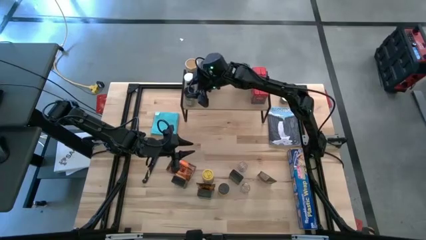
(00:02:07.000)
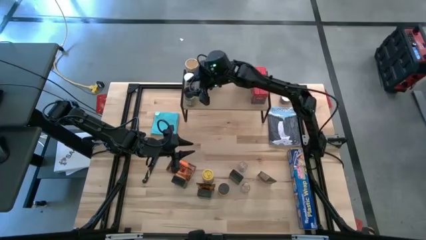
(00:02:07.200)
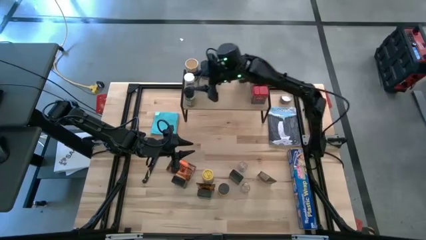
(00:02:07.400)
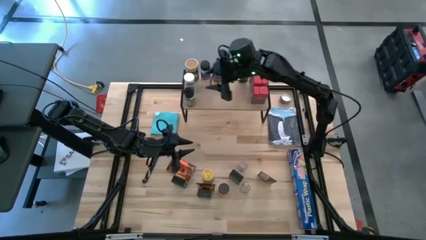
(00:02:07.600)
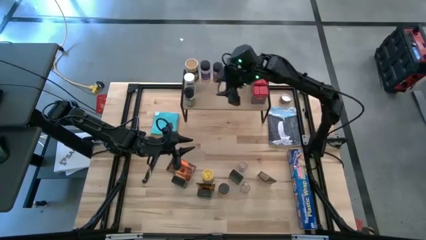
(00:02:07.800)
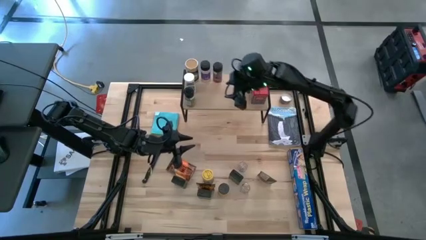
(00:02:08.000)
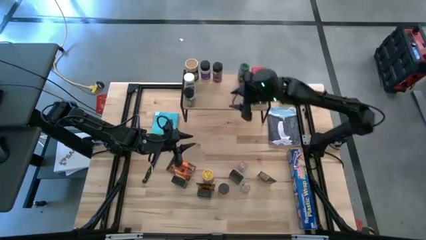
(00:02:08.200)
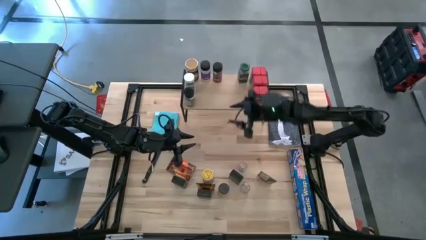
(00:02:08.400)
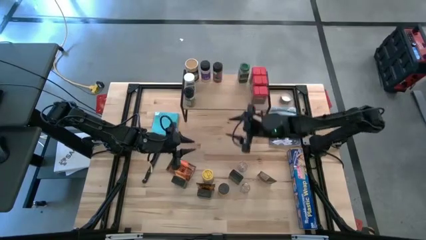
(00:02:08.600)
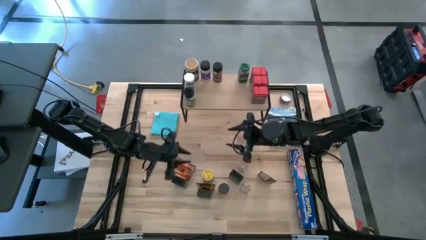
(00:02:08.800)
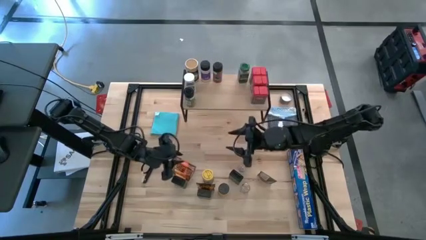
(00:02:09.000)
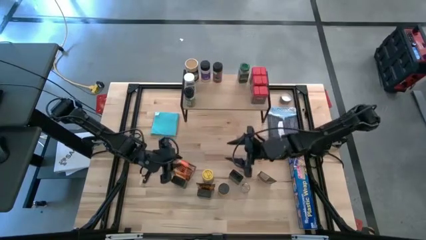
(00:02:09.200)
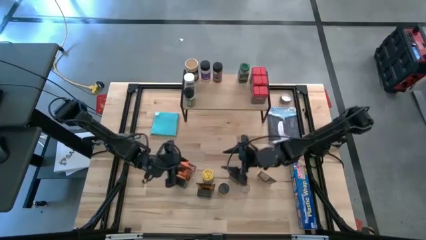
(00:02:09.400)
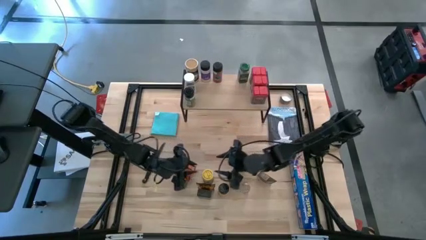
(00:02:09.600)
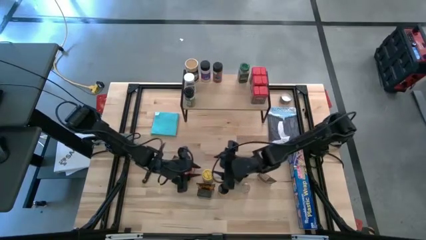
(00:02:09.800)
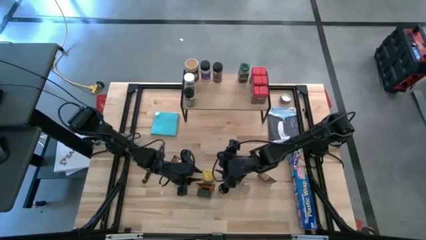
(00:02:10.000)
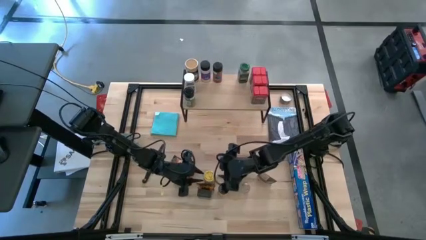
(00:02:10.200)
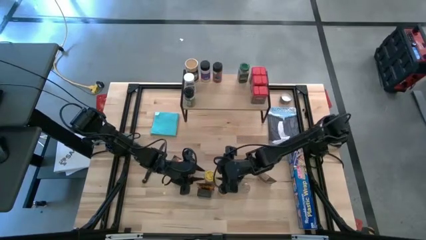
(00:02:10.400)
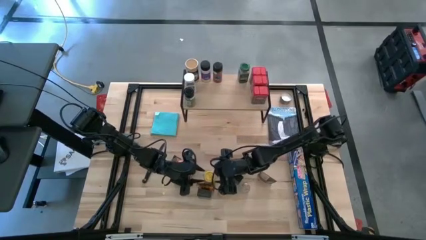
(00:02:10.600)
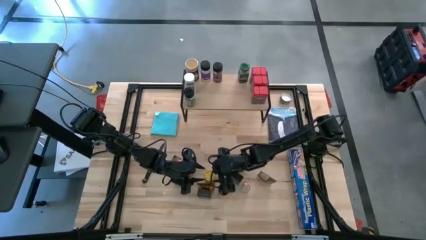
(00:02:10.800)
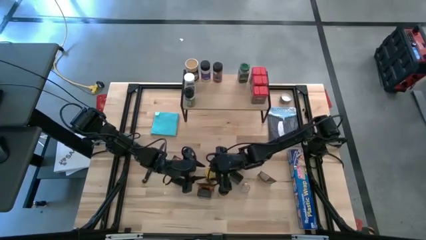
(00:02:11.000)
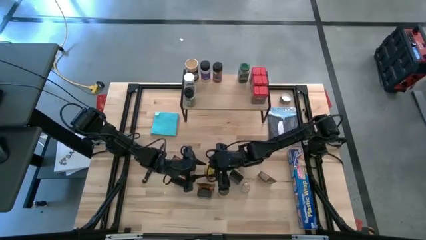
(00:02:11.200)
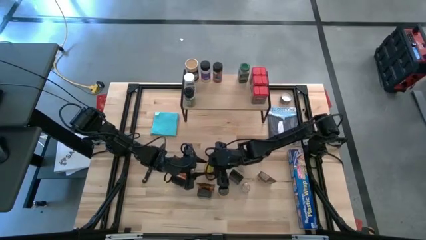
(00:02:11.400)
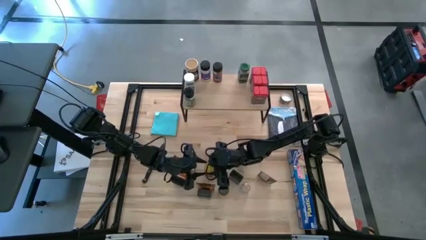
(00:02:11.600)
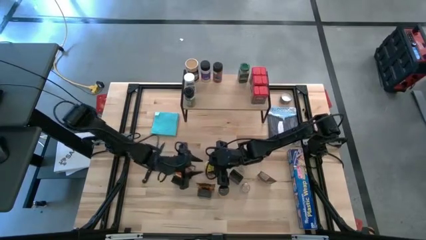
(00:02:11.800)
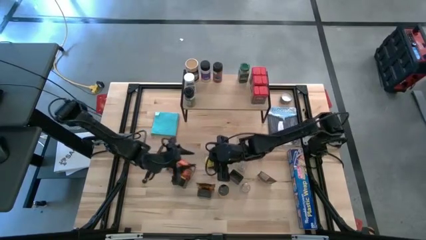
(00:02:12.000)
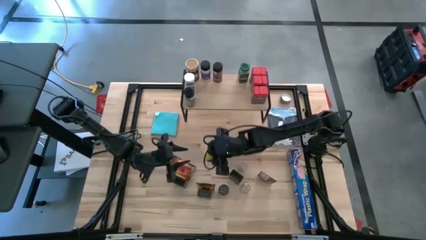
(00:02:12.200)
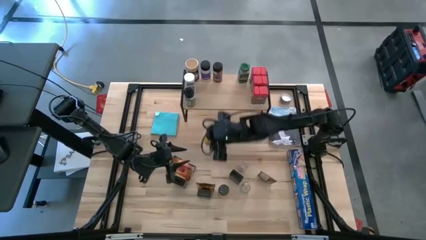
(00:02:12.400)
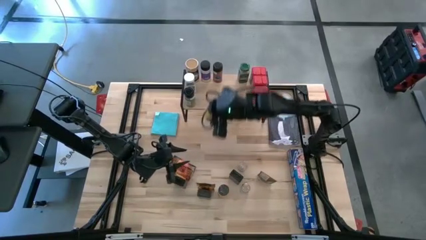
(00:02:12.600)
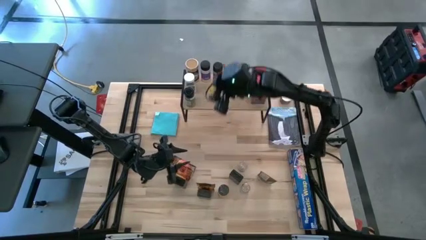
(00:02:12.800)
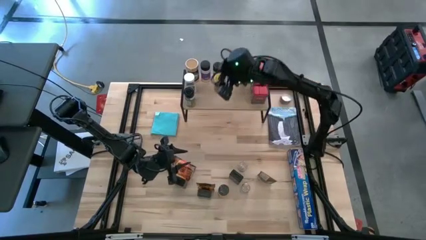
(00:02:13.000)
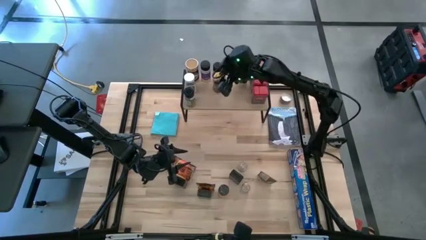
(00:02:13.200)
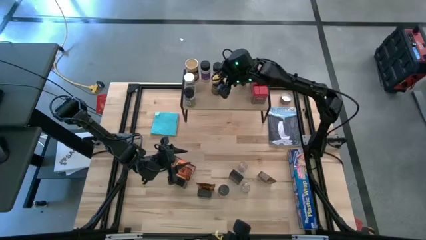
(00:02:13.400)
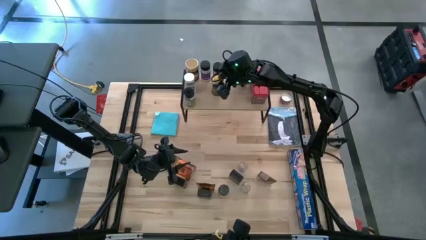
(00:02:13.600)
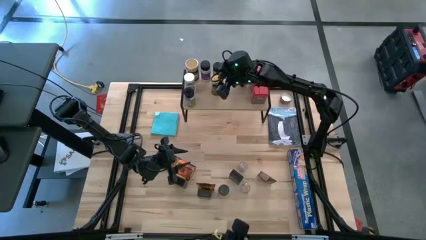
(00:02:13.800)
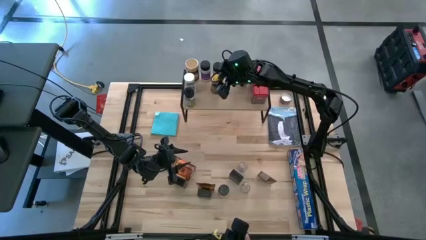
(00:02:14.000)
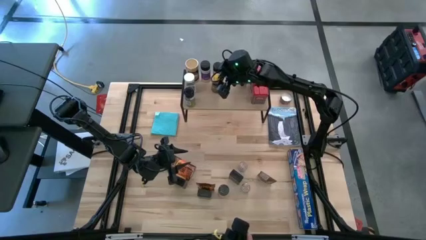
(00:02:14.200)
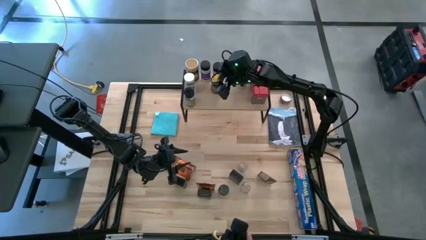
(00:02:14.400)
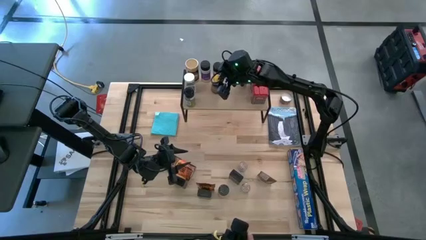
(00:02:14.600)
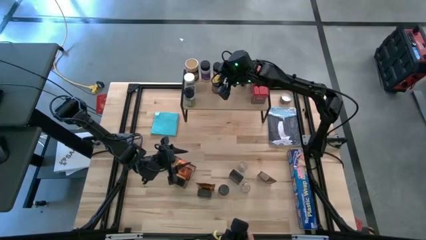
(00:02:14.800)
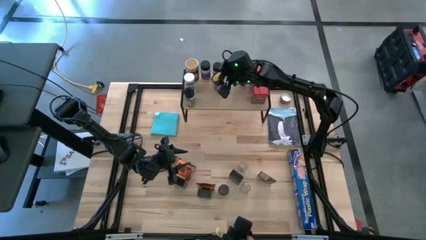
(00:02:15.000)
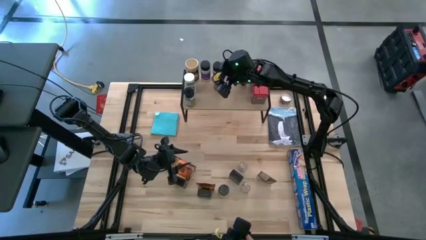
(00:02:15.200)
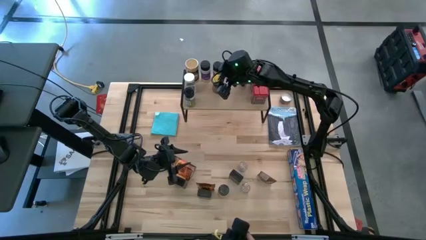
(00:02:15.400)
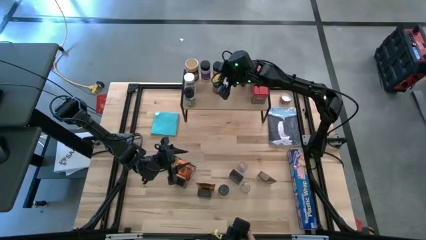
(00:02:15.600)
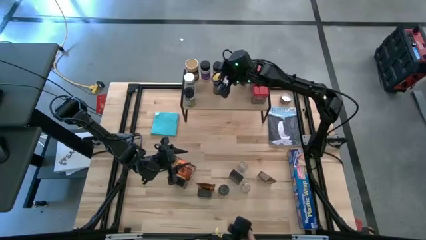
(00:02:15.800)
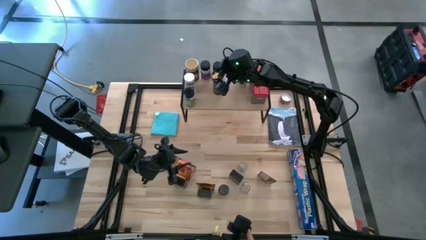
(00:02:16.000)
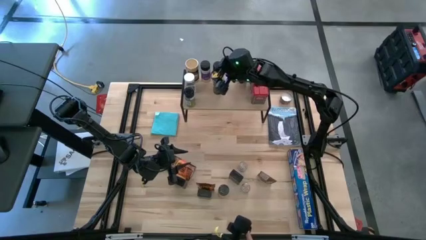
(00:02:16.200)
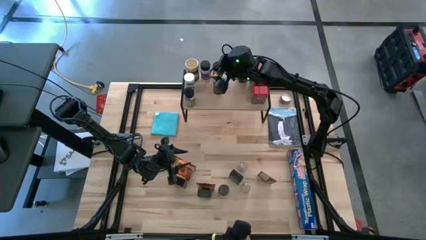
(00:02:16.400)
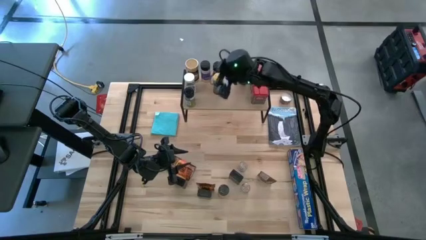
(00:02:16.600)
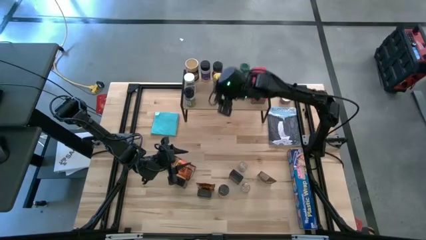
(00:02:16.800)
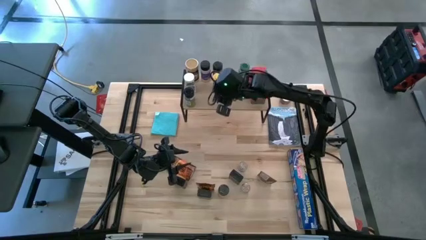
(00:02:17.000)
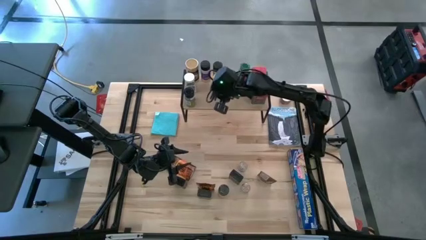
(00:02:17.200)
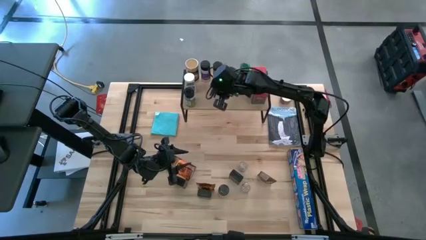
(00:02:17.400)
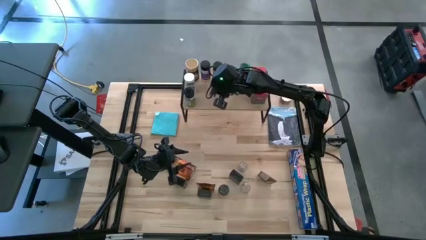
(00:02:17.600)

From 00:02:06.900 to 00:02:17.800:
Task: Shelf spices
Put the yellow seasoning bottle on the shelf

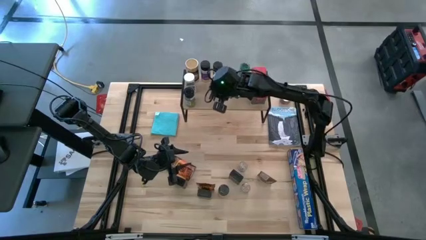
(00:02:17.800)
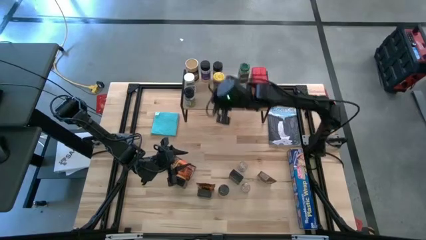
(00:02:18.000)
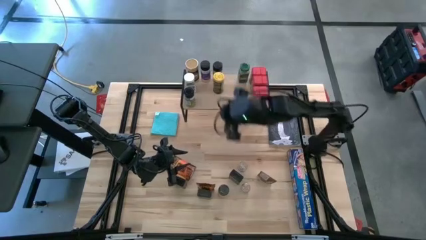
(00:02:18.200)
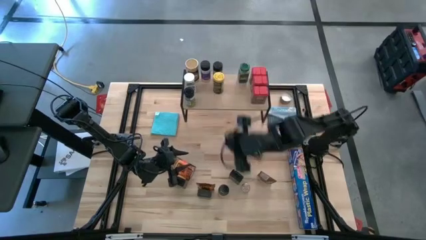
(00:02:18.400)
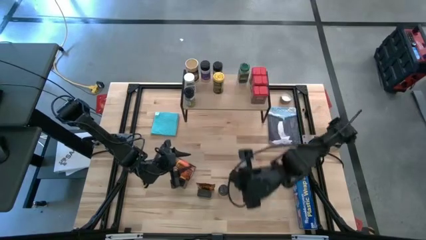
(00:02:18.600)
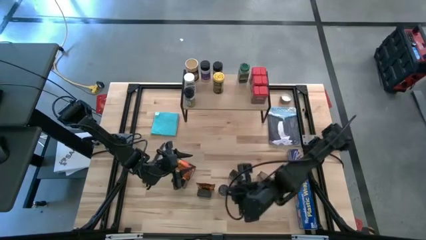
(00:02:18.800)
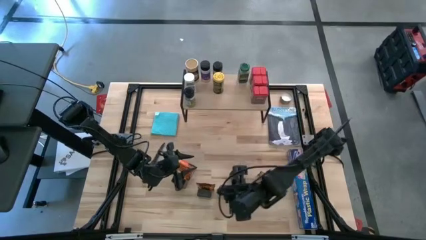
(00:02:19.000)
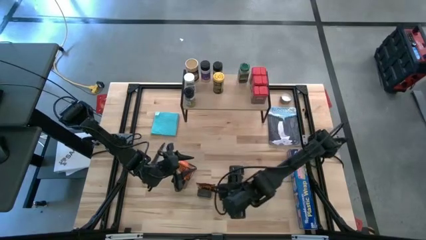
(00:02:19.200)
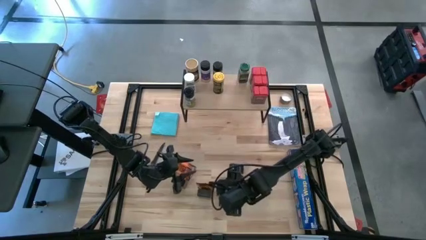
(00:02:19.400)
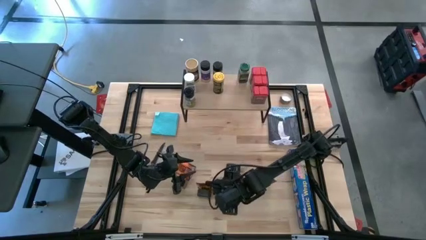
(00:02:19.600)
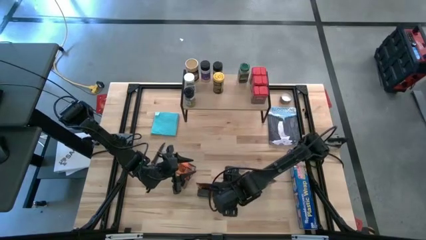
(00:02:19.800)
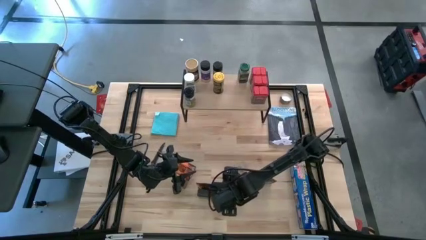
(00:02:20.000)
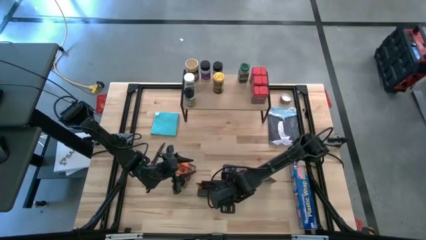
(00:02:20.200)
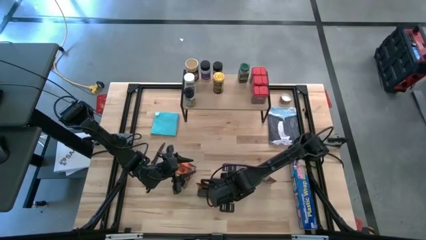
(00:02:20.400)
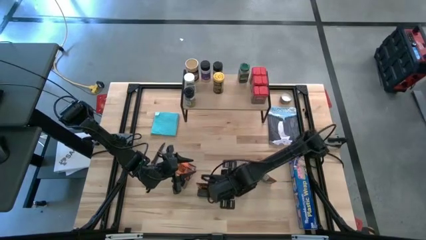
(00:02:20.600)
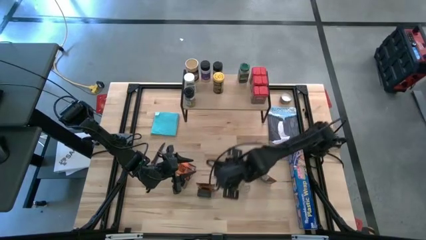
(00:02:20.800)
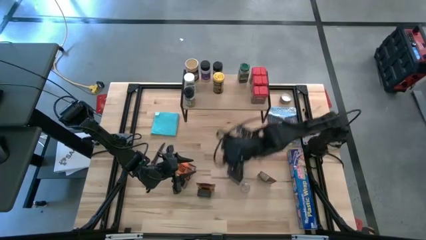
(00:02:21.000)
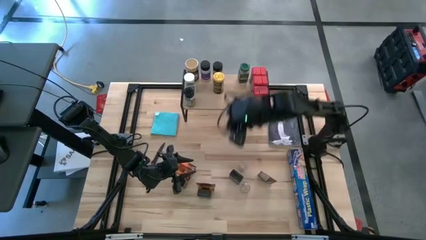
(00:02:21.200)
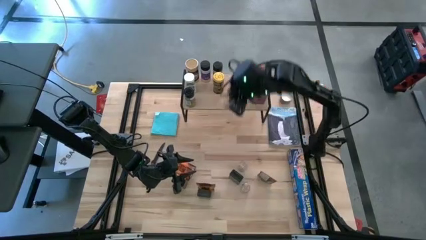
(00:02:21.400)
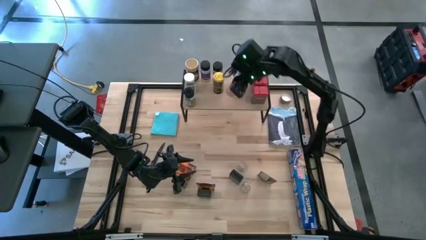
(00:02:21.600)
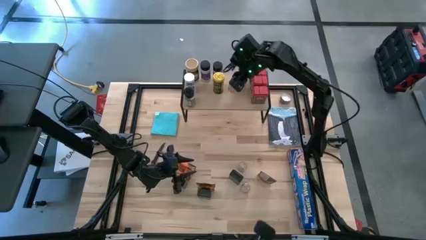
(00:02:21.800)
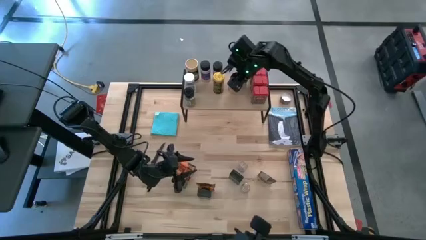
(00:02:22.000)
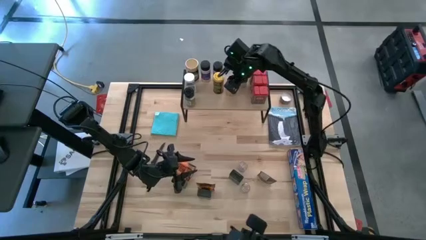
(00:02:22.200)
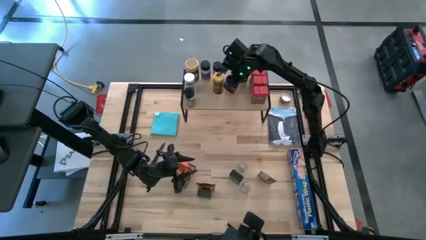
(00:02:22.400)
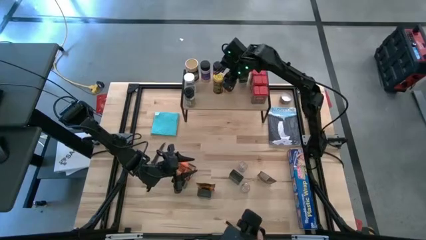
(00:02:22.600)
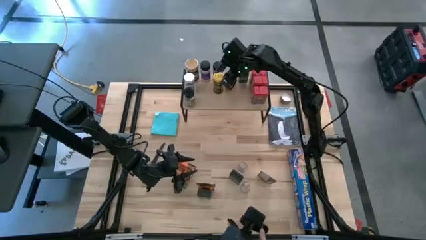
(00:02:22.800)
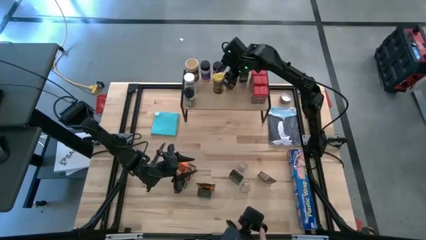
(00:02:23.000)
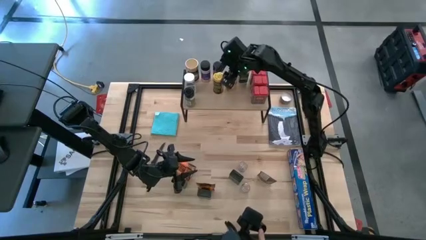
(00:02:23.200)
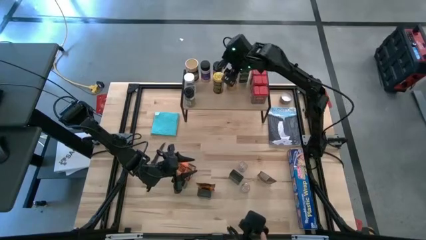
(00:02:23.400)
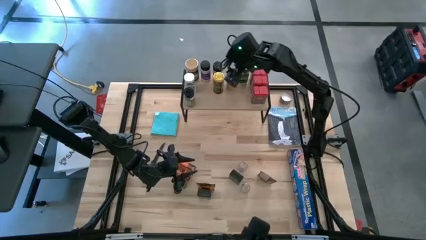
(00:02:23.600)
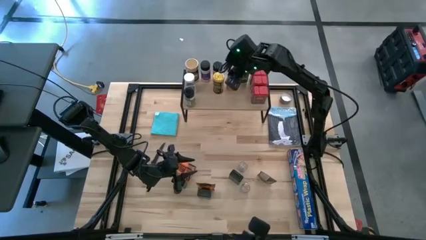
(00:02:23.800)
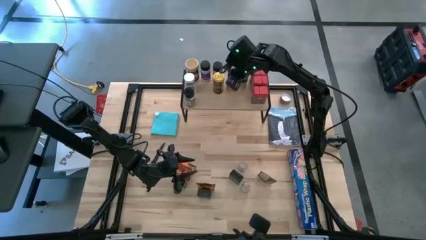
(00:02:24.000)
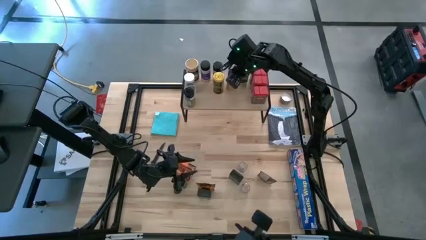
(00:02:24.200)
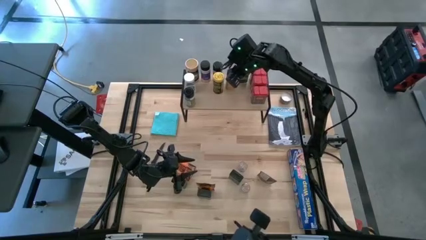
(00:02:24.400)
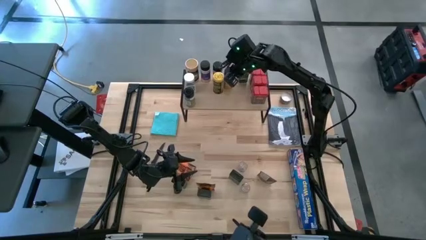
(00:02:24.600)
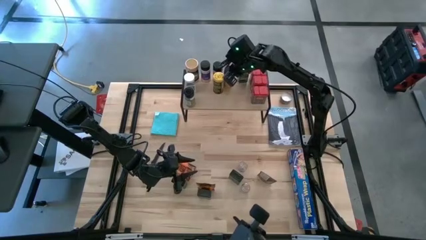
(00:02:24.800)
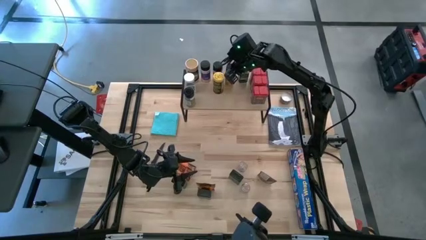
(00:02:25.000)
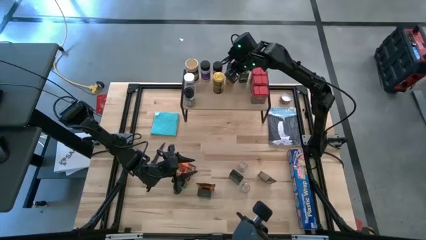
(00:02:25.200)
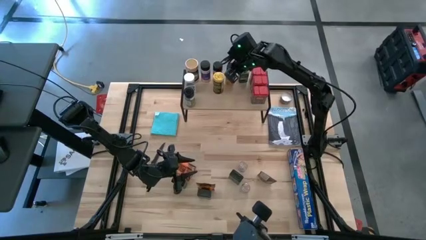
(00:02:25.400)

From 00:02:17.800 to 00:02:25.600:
Put the black seasoning bottle on the shelf
